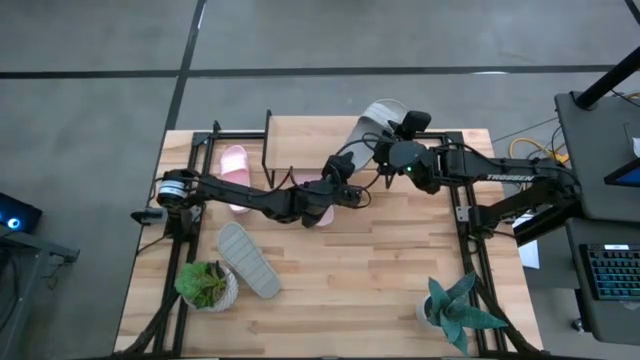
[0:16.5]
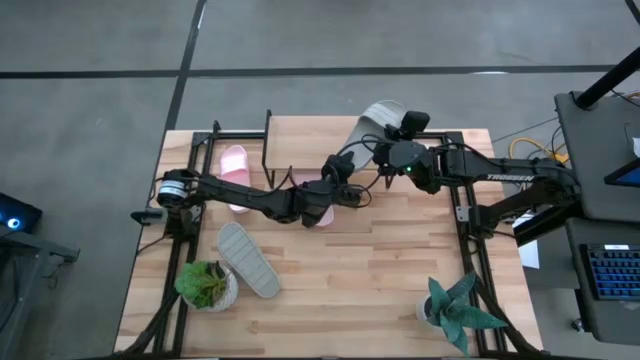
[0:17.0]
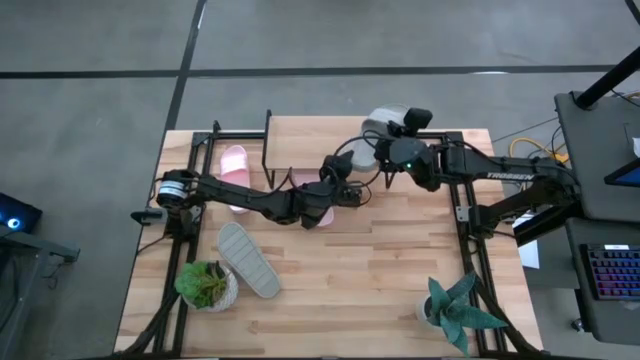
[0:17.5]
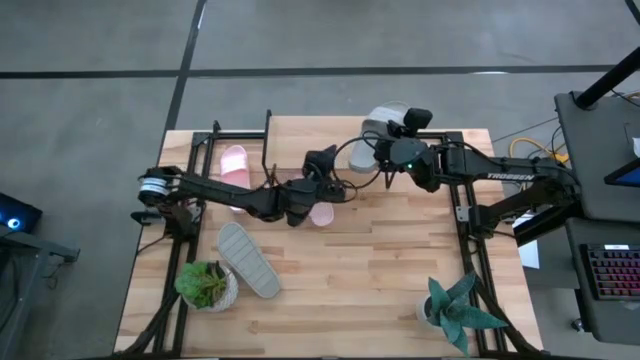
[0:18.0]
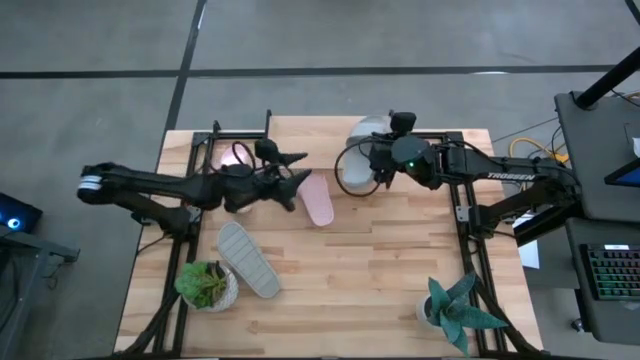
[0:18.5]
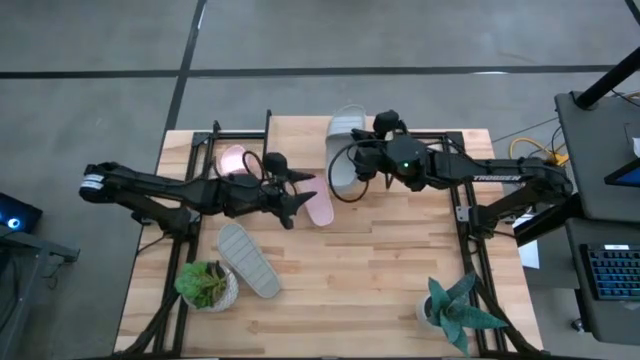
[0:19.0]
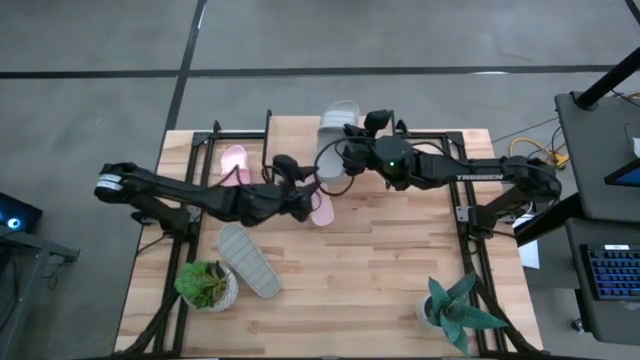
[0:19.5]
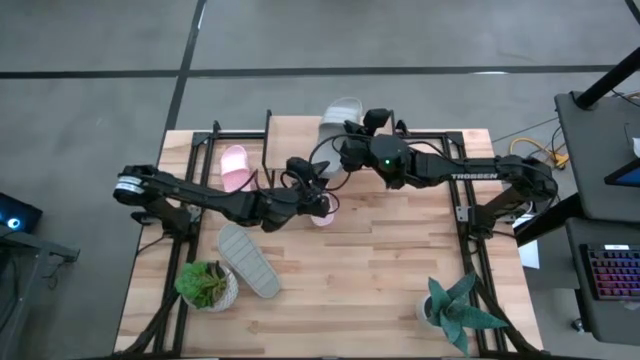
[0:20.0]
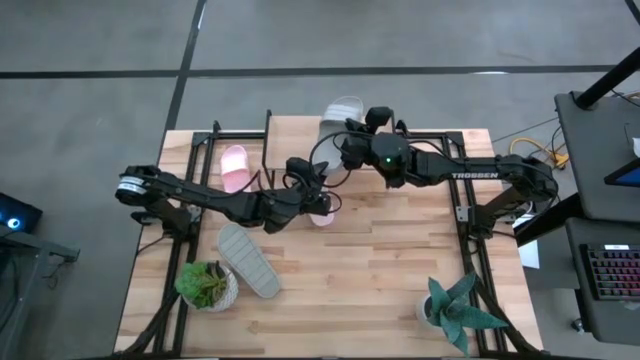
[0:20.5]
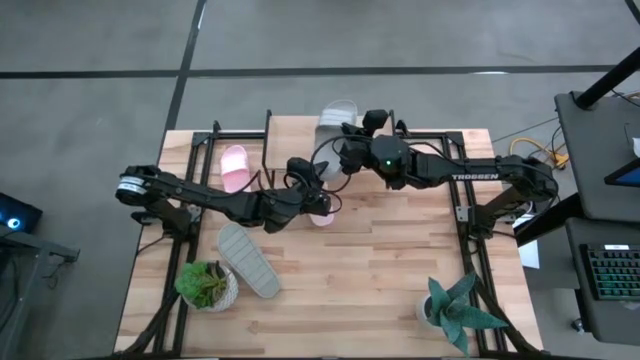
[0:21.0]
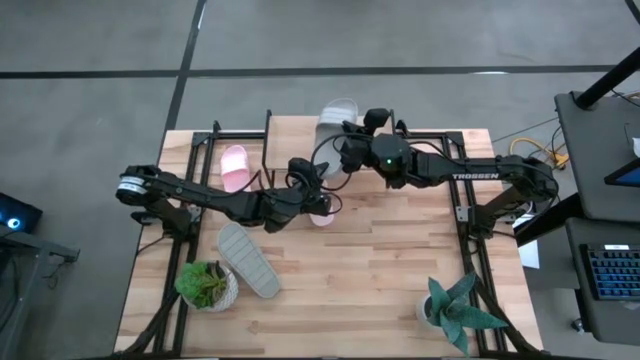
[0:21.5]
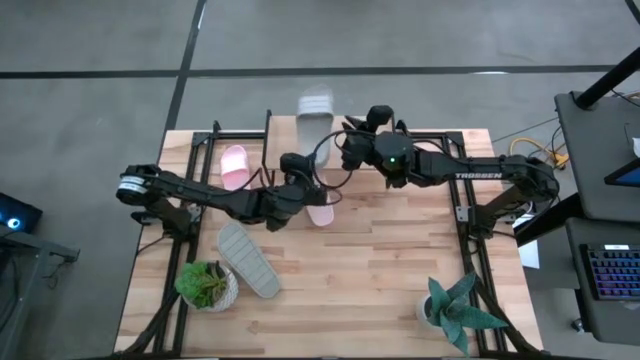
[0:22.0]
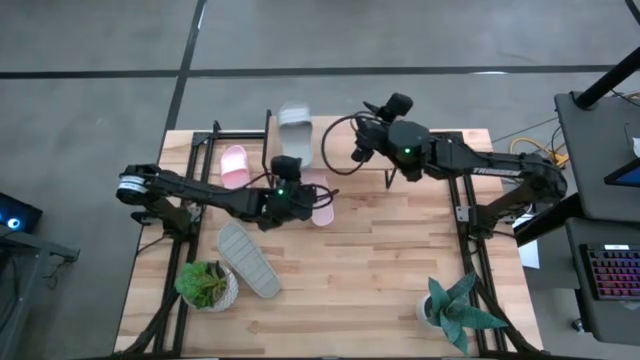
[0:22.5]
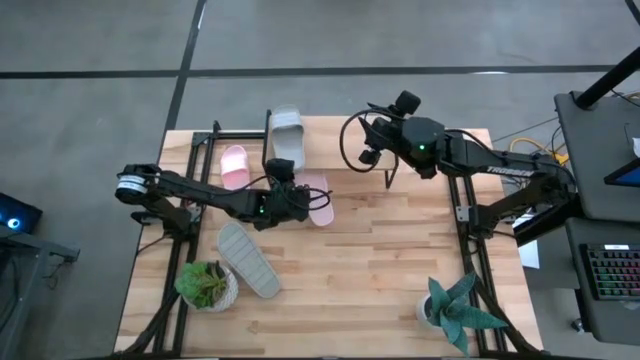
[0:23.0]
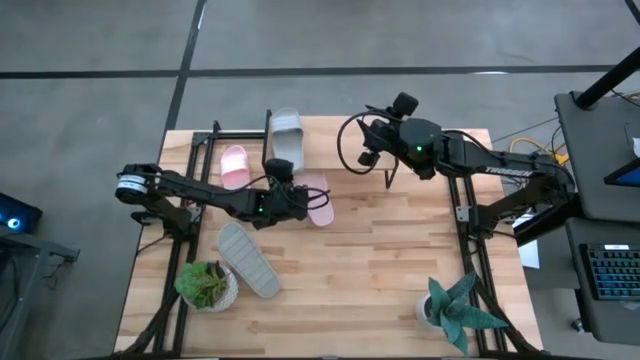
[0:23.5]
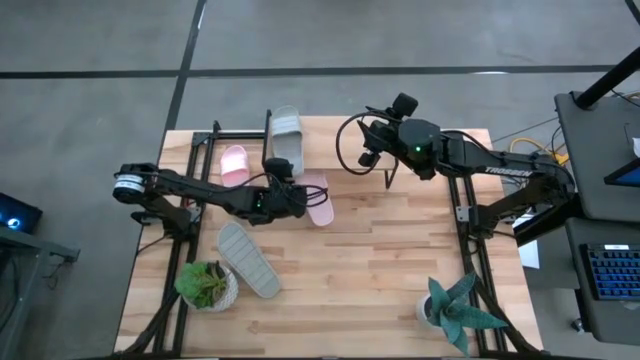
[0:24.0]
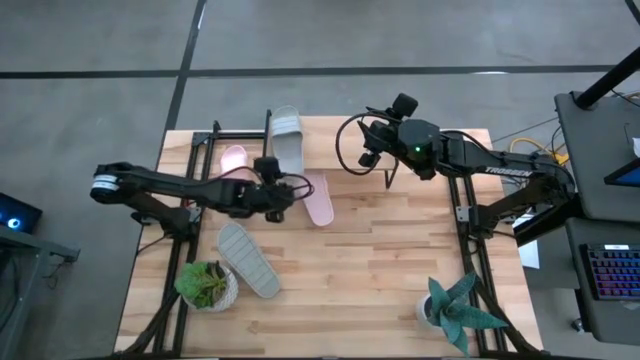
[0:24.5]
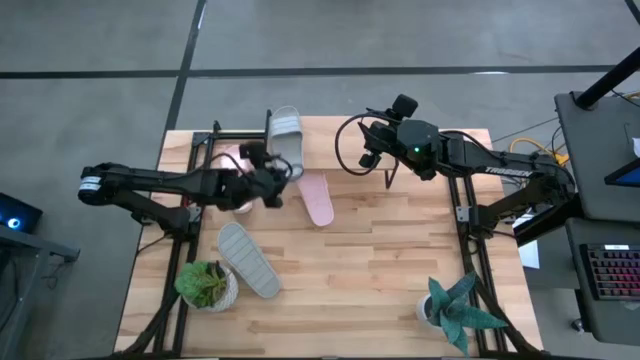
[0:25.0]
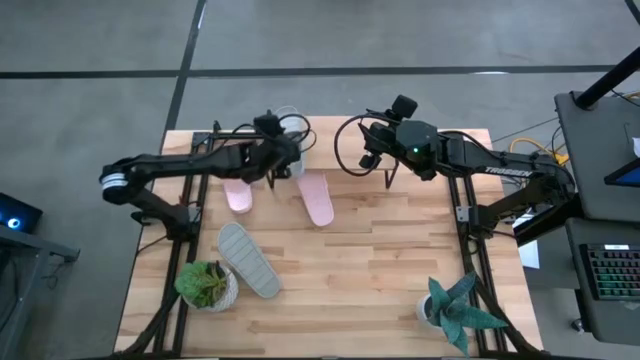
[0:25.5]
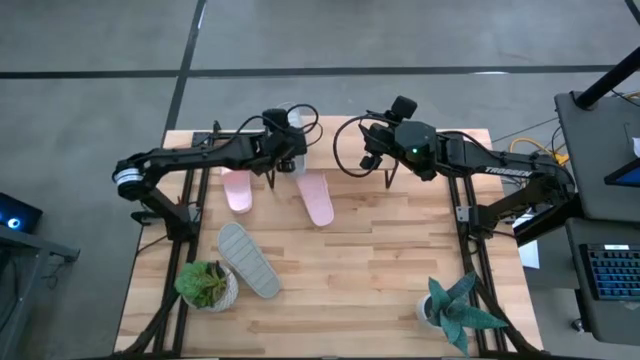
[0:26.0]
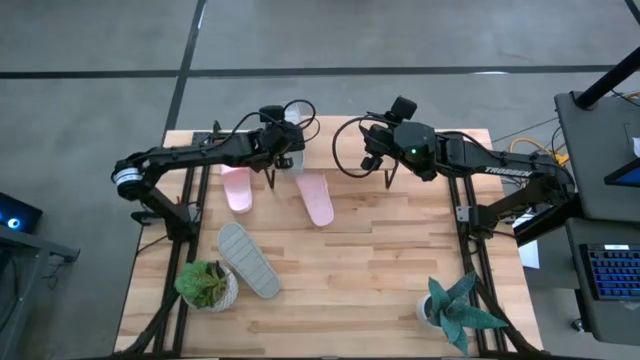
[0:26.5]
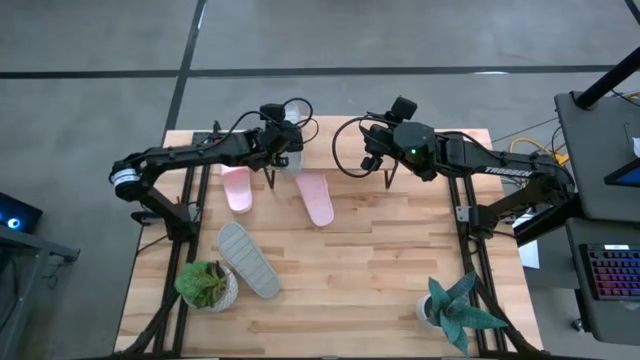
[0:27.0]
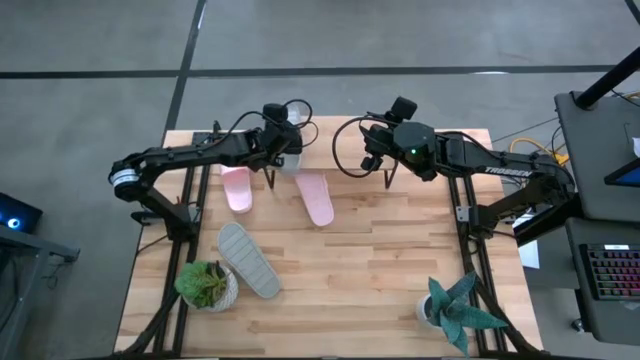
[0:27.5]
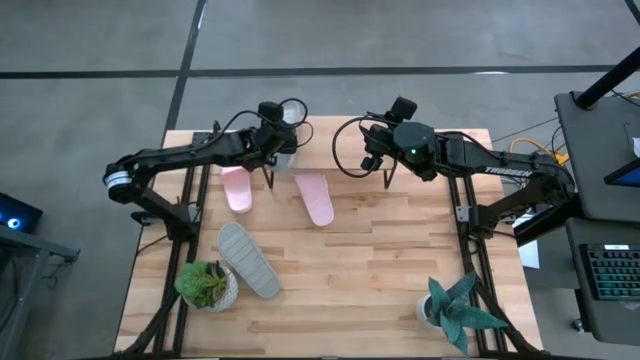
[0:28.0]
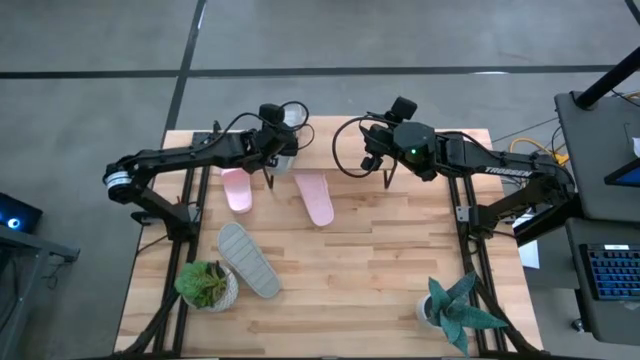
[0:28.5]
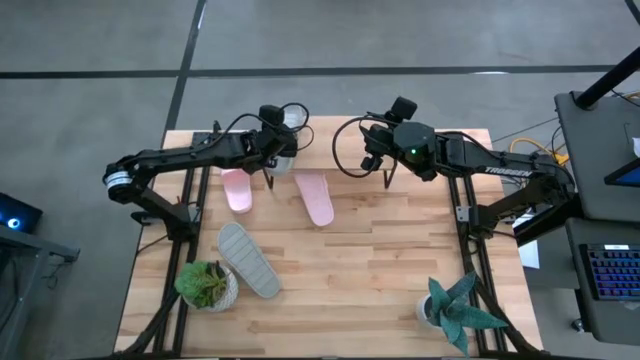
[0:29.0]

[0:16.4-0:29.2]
Task: Pick and place slides into the shelf
Put the right gray slide on the shelf

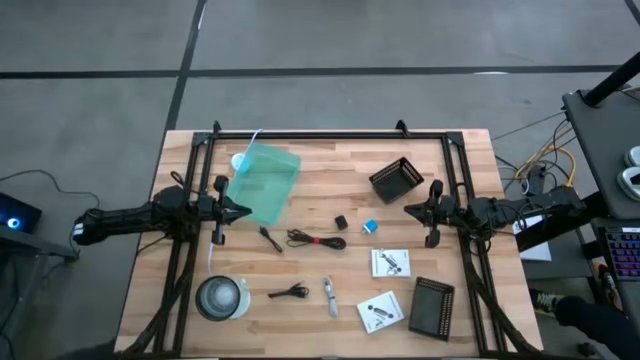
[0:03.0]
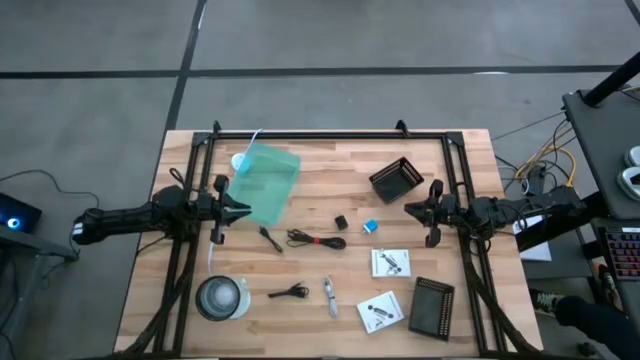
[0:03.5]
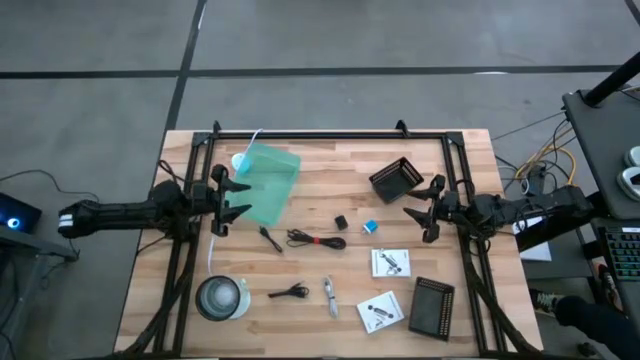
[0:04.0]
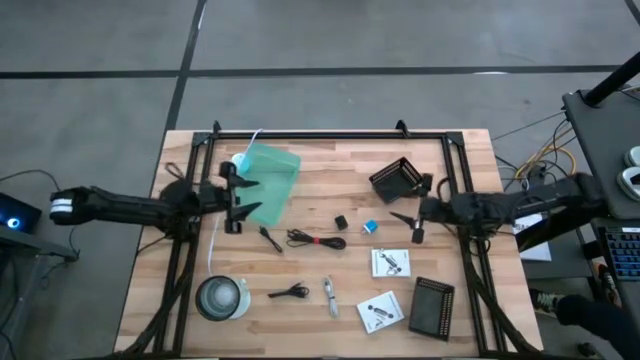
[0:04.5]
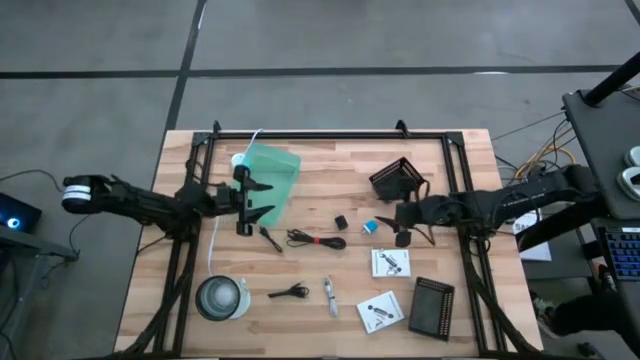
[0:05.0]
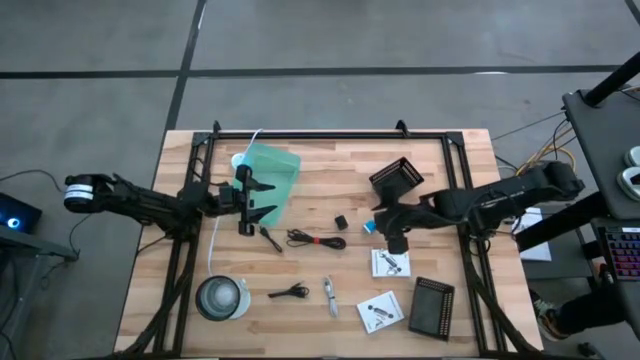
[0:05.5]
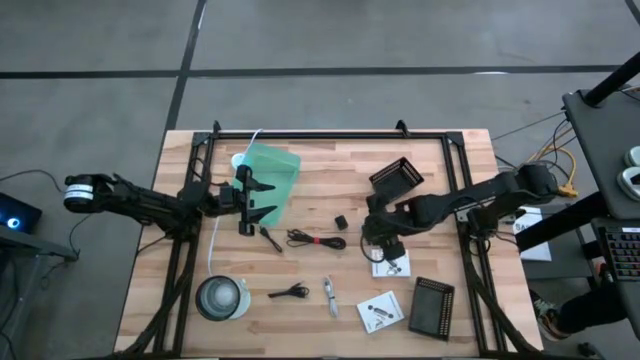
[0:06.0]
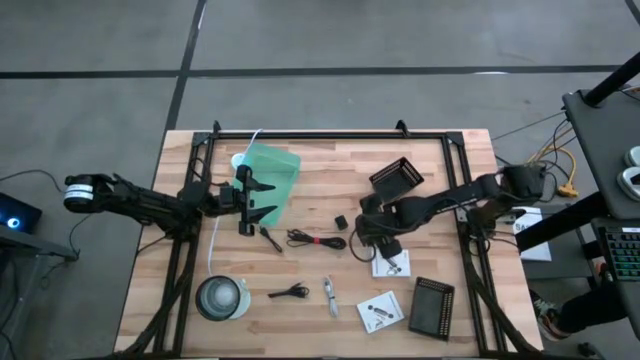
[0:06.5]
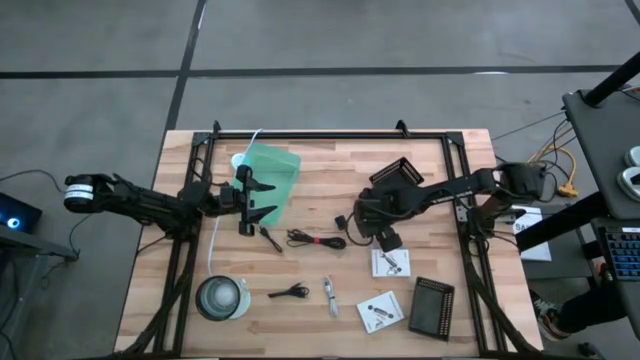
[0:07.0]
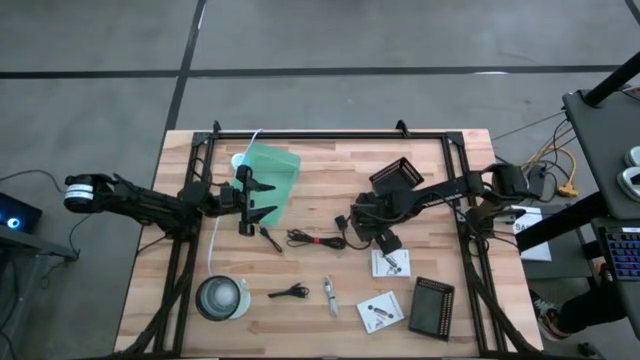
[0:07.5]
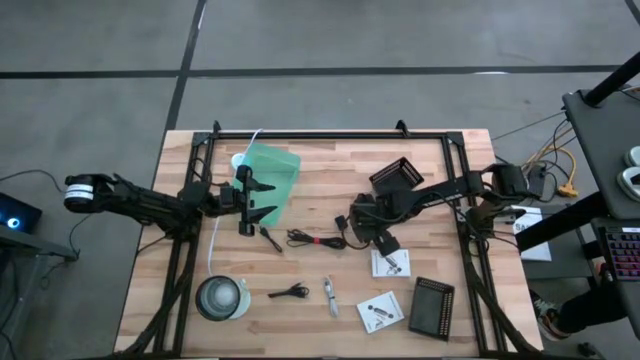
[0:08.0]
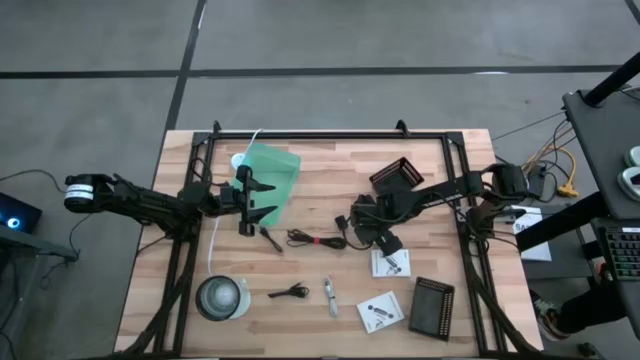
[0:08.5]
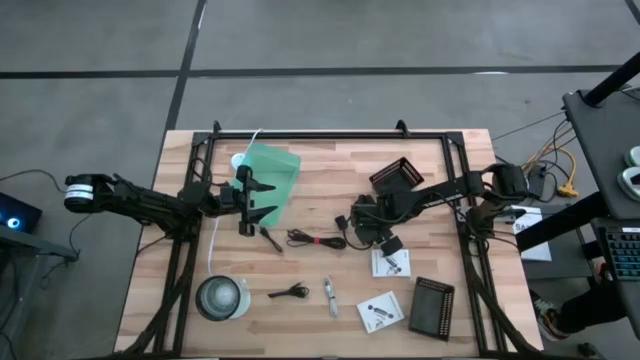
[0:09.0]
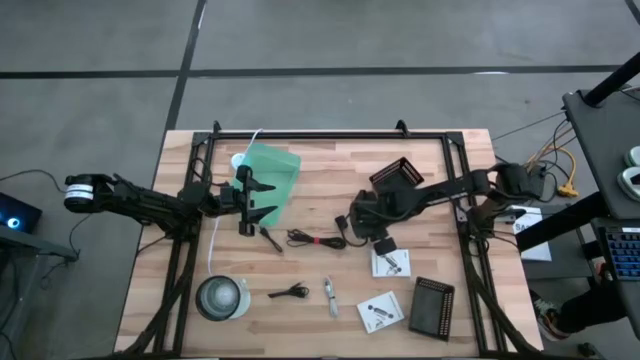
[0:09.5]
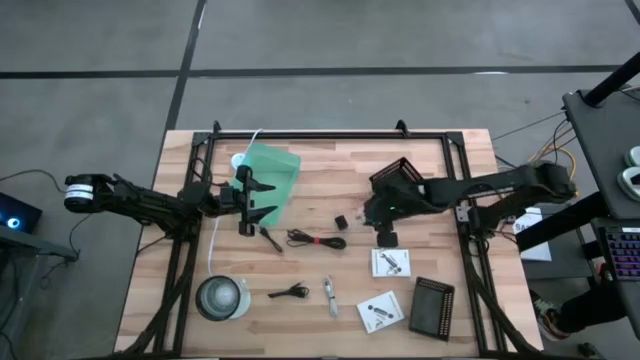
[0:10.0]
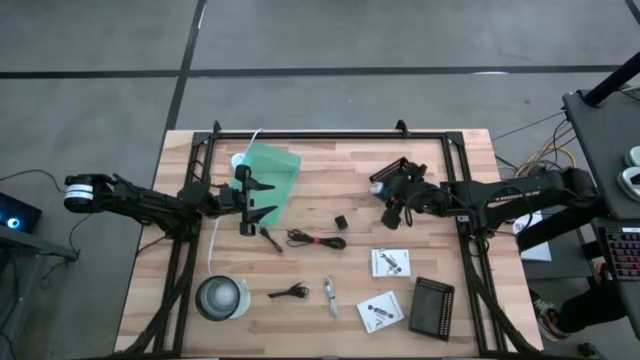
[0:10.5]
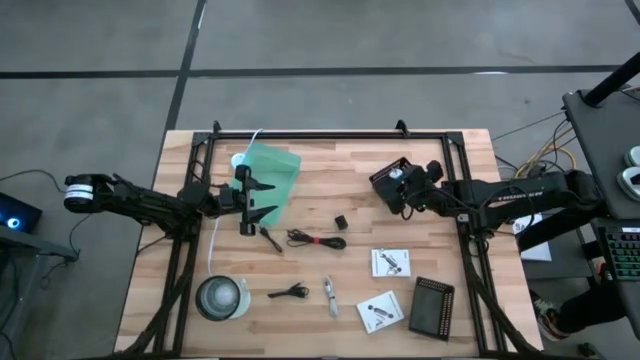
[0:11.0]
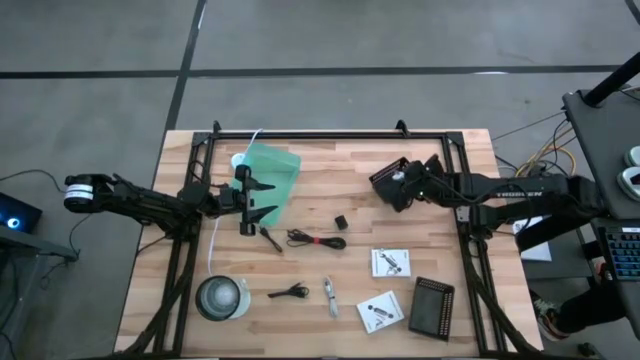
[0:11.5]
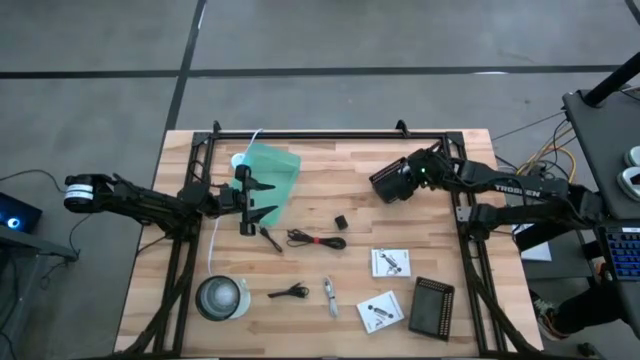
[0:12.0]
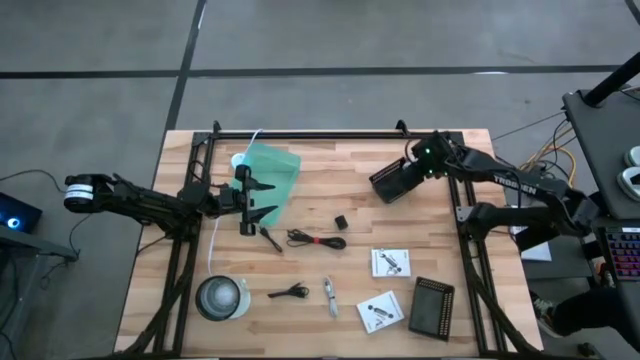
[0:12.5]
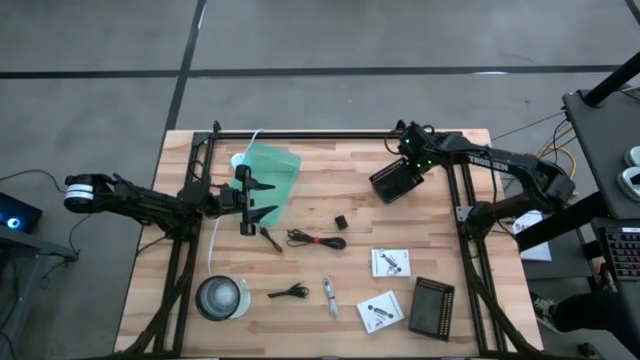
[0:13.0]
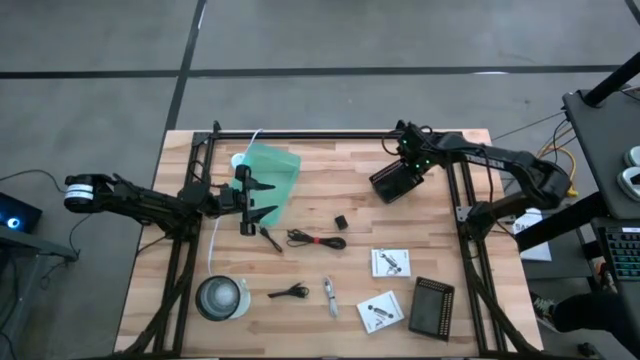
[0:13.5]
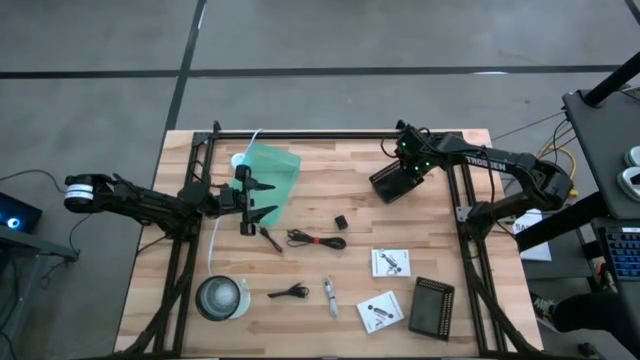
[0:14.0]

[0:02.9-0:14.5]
Task: Pick and place items into bin
Put the blue charger adapter into the top black bin
